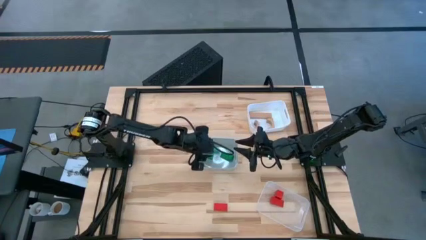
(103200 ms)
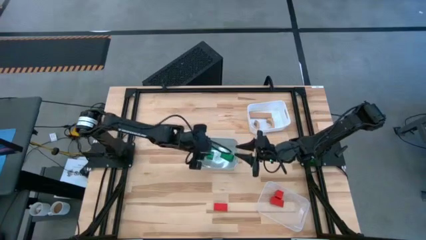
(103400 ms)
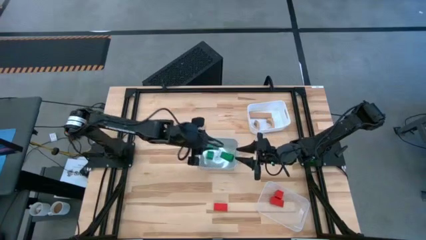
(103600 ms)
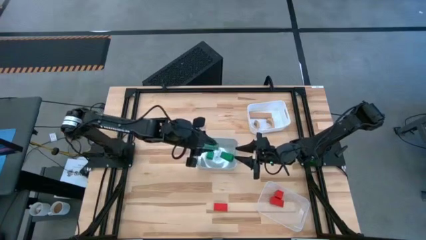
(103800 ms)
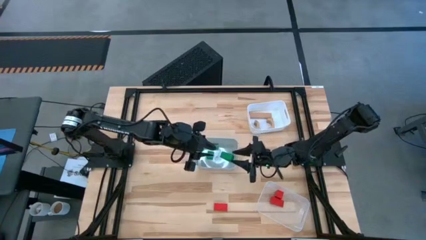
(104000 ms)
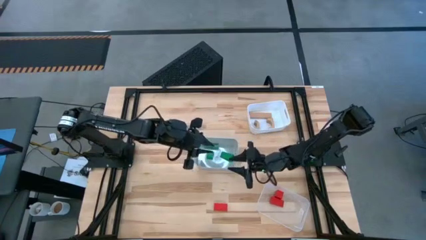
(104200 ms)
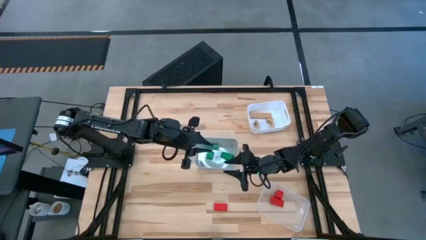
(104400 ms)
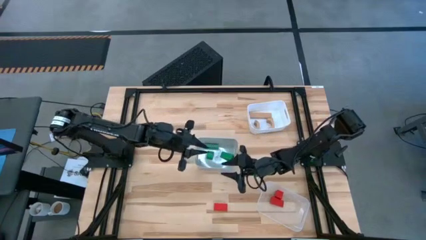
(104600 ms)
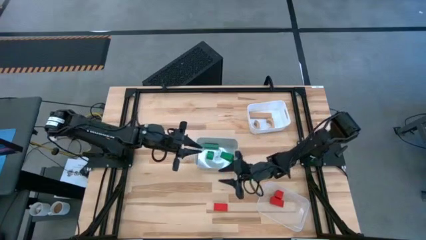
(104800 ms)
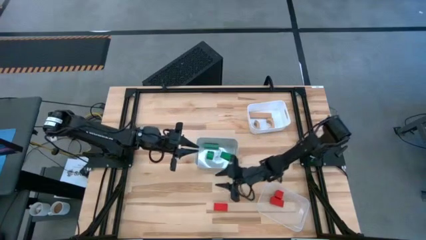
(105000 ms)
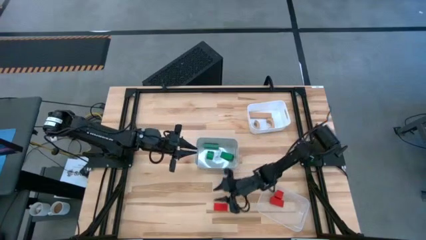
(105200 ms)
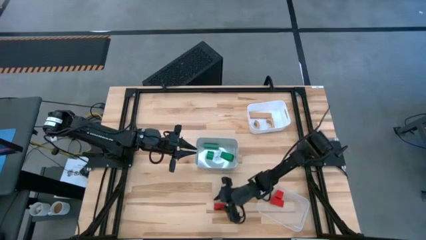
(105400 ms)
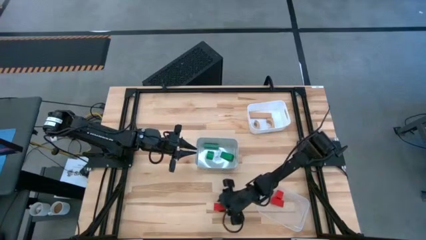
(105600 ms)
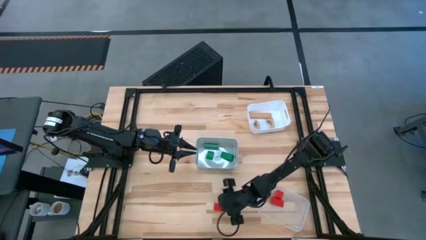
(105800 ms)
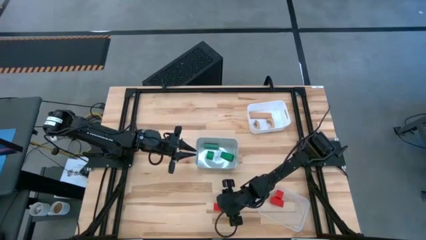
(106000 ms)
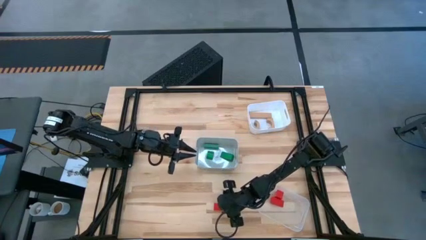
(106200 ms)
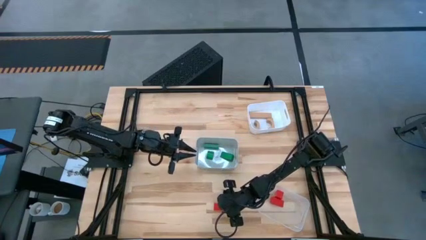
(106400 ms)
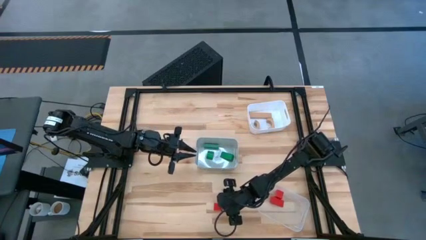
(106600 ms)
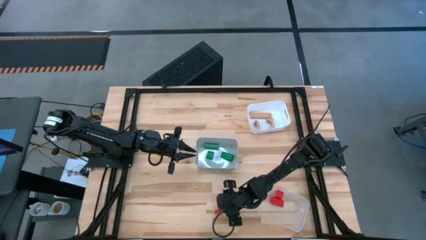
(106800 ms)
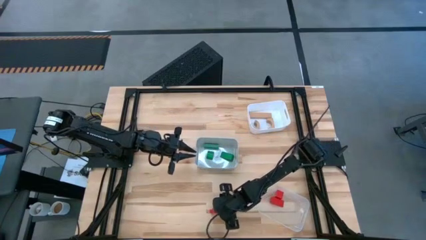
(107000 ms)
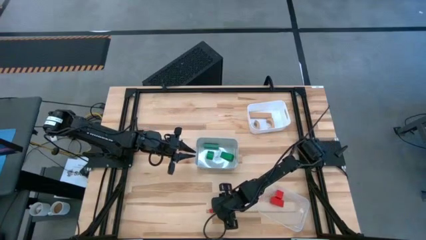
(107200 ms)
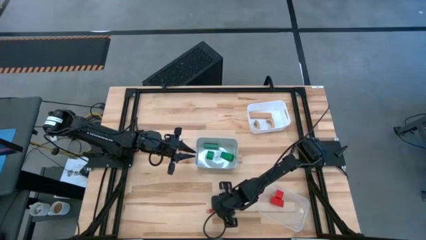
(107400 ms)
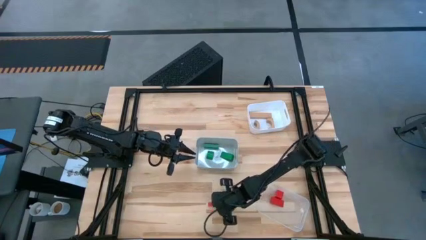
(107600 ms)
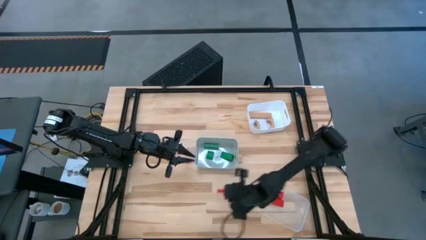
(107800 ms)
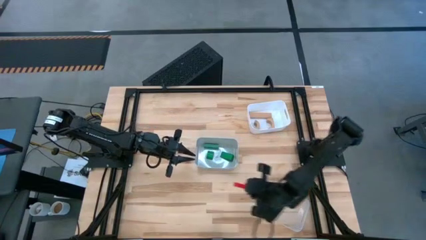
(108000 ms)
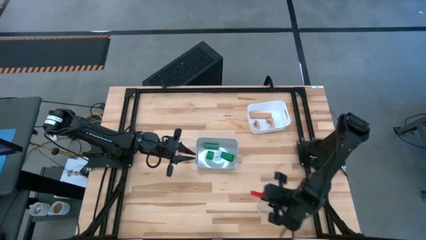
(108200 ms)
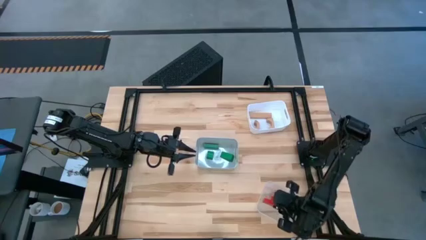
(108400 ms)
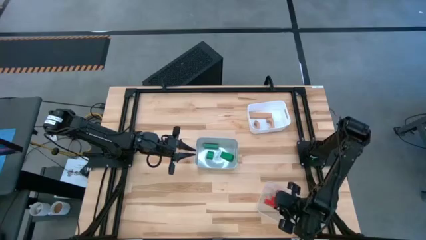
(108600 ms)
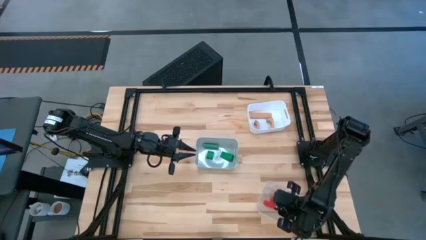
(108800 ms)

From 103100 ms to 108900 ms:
Task: Sort & place blocks by color
Put the red block into the transparent bin

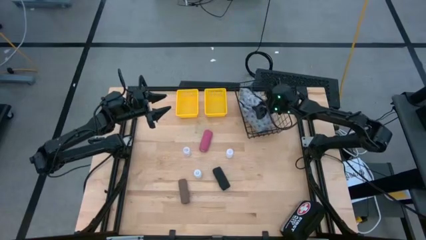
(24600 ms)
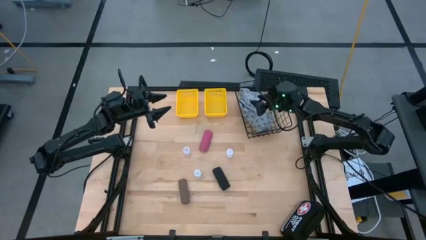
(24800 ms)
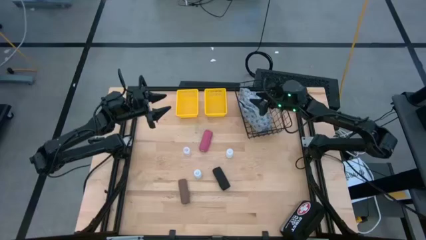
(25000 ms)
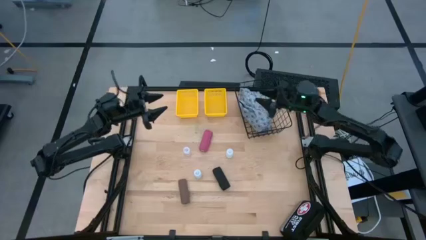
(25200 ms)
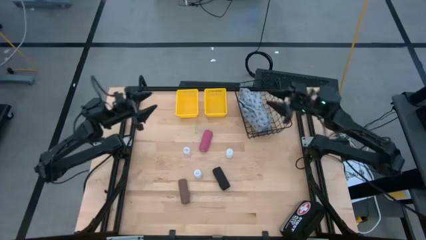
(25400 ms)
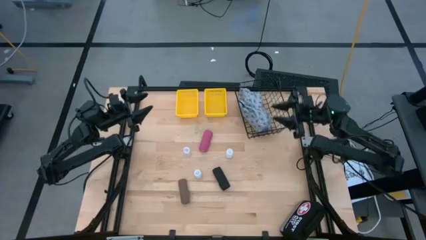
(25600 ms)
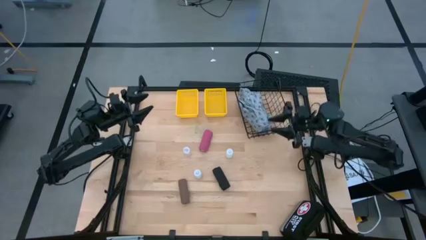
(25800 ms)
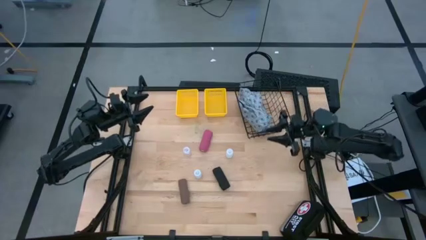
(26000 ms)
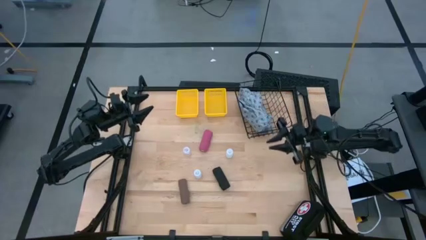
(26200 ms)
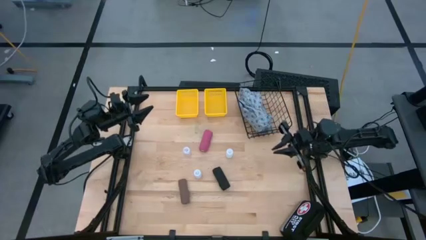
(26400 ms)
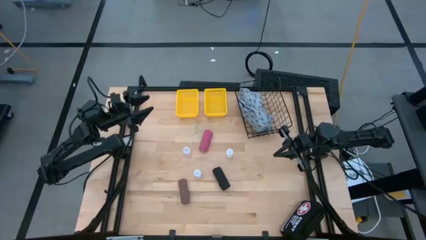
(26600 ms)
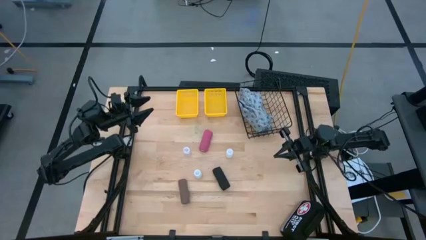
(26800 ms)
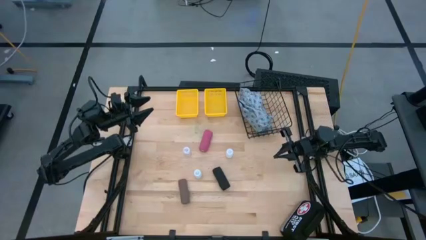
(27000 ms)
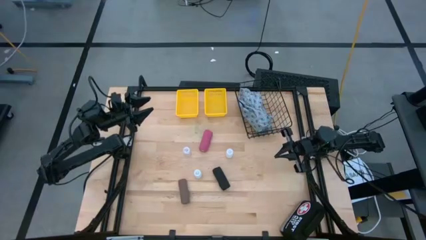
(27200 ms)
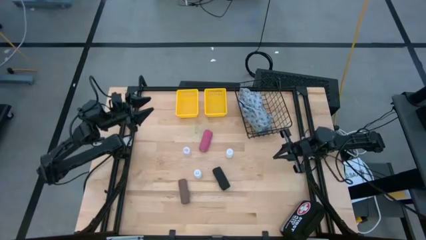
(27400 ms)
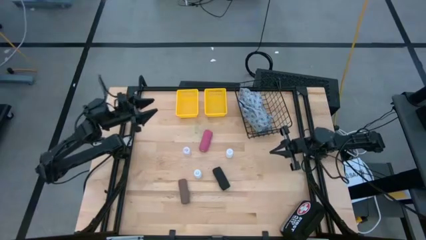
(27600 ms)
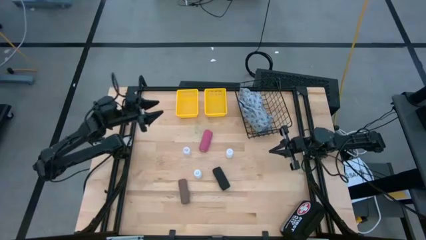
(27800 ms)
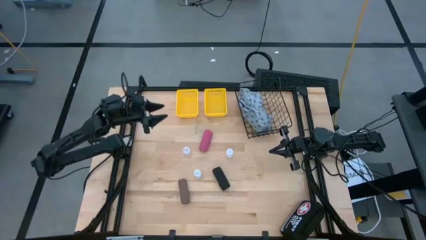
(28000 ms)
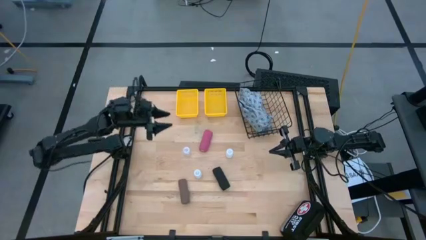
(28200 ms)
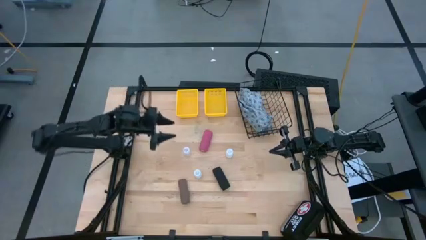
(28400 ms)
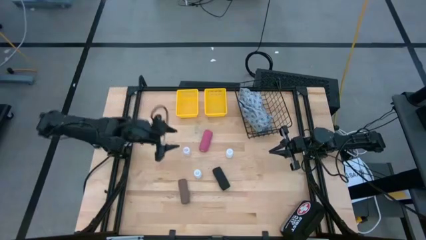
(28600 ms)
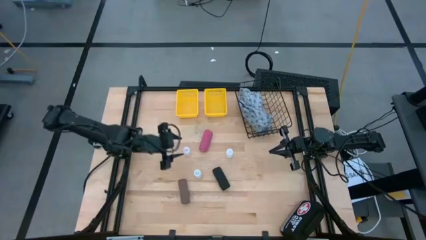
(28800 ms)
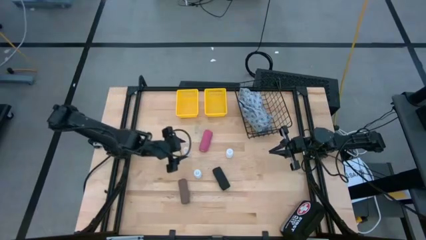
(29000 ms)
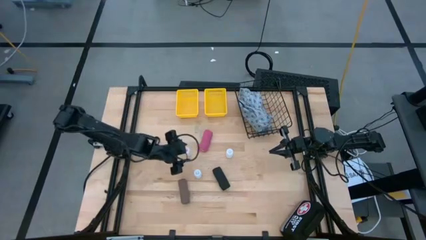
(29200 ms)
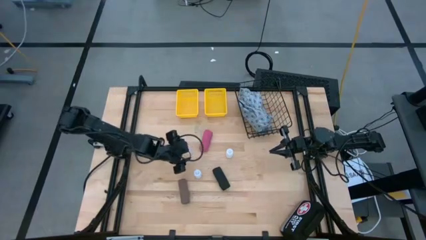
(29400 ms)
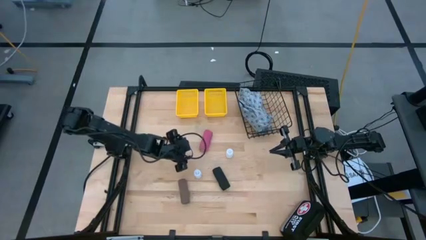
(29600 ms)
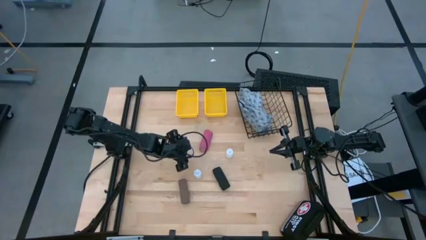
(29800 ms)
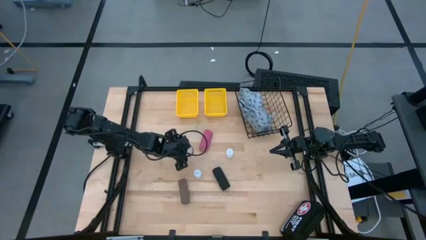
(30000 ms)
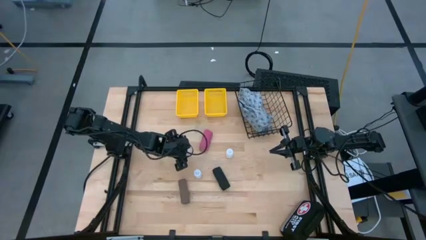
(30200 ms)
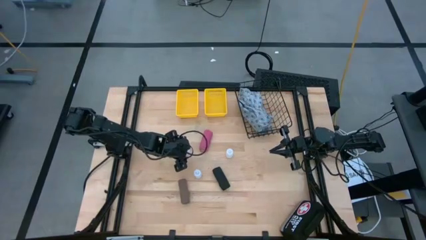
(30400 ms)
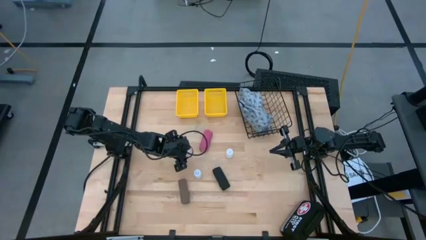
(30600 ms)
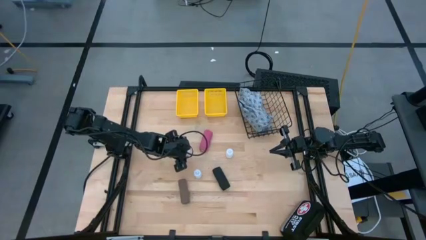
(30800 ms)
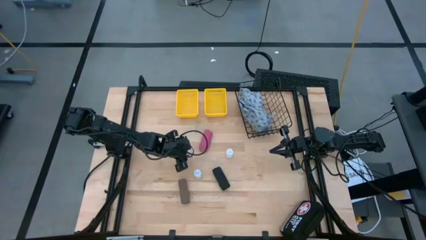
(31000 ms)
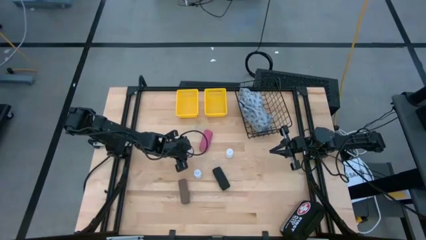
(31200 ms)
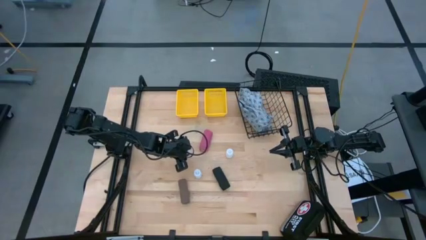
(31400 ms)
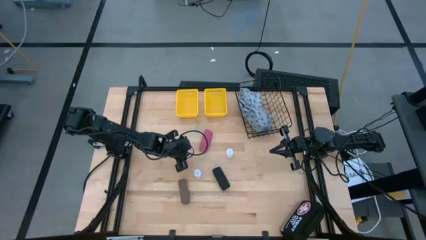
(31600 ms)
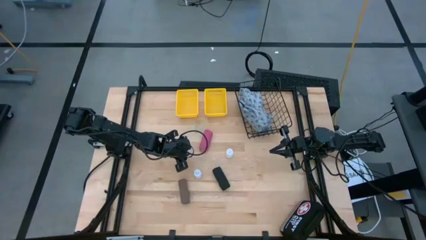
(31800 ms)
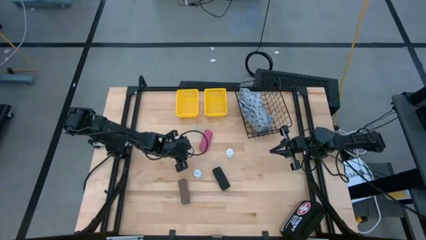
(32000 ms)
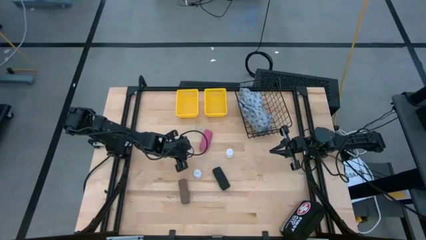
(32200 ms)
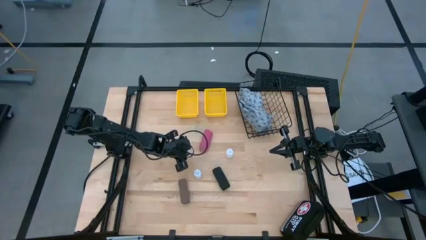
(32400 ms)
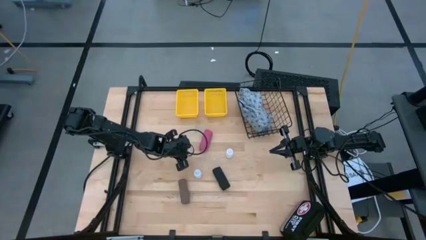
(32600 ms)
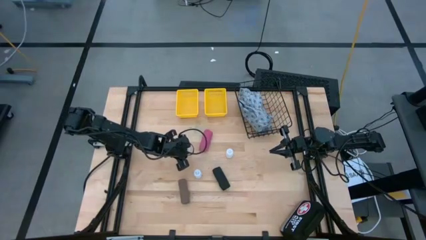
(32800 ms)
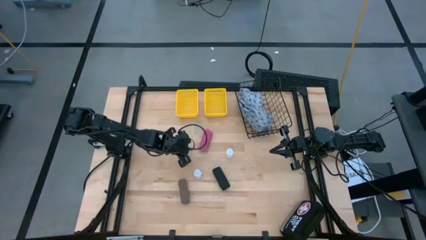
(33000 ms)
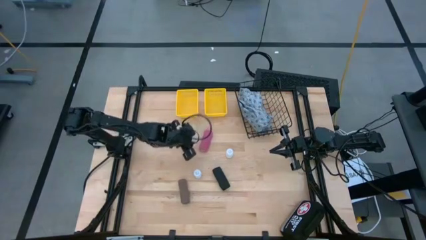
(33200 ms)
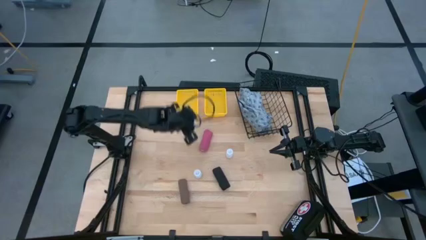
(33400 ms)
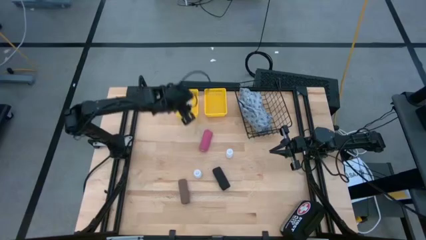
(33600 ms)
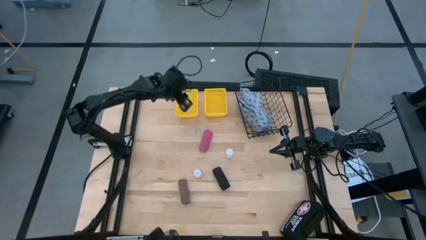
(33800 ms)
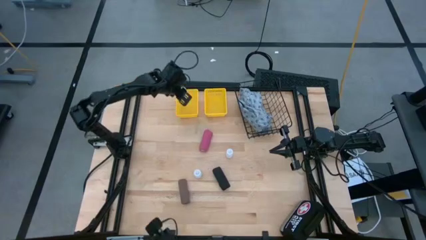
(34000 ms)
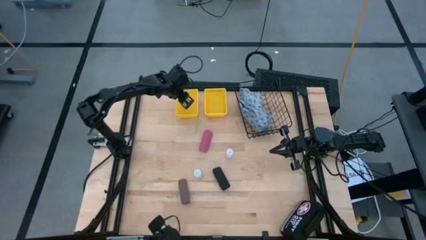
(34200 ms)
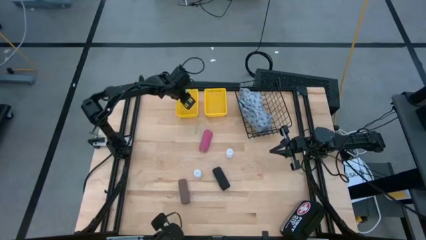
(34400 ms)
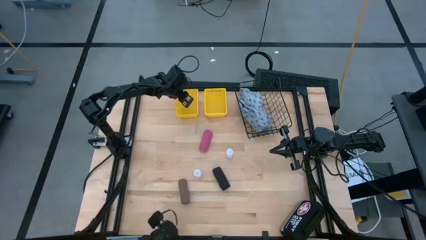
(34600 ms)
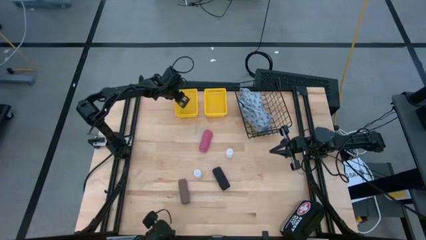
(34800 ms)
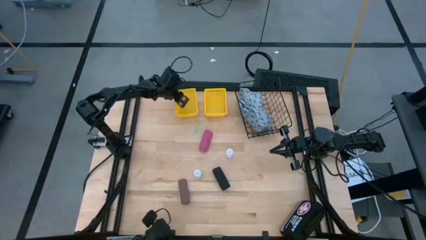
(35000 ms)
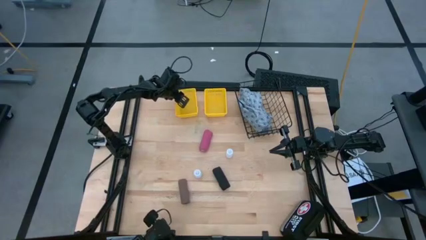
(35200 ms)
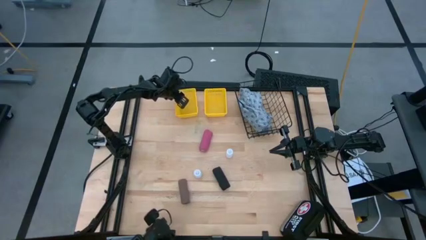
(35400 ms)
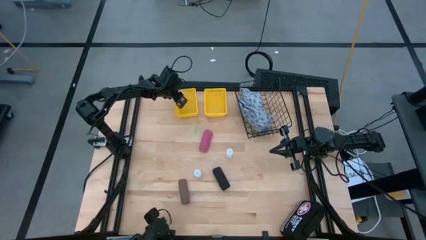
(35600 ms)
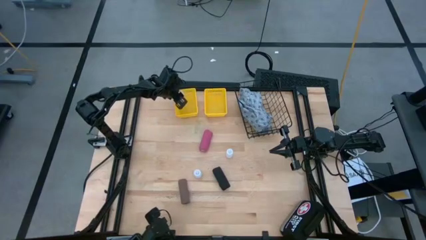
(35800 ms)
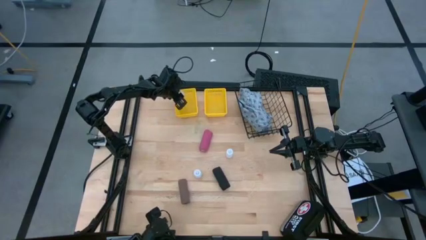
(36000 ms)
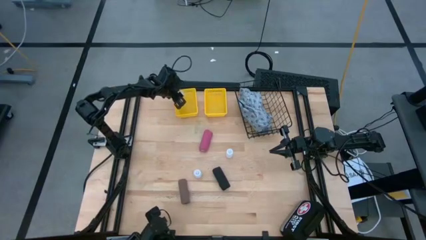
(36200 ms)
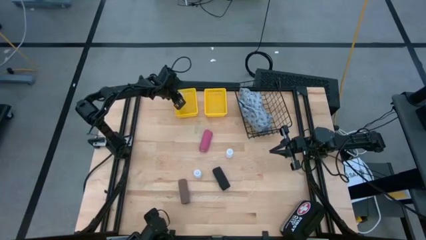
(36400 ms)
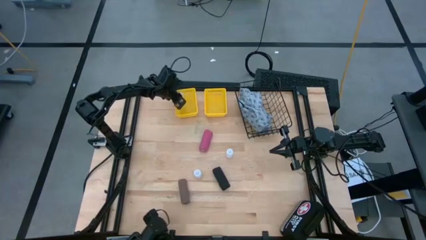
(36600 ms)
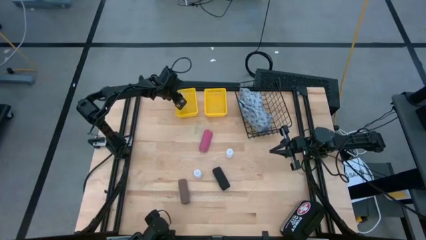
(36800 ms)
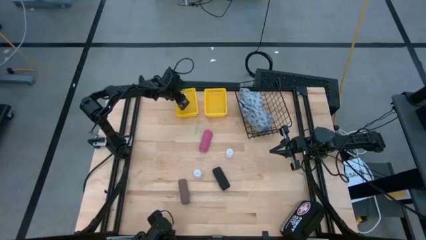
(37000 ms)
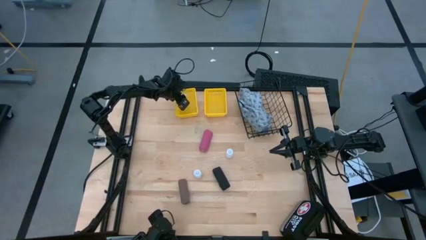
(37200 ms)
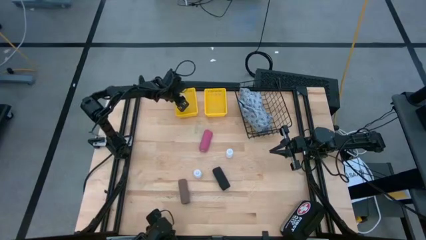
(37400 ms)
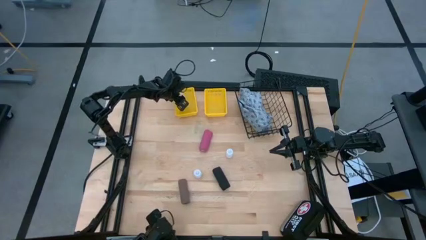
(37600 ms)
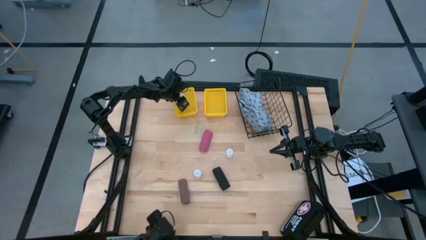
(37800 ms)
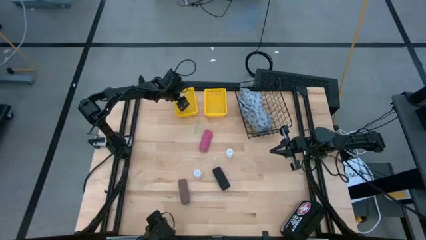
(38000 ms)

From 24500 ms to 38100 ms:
Task: Pick & Place Medicine items
Put the top left pill bottle into the left yellow basket
